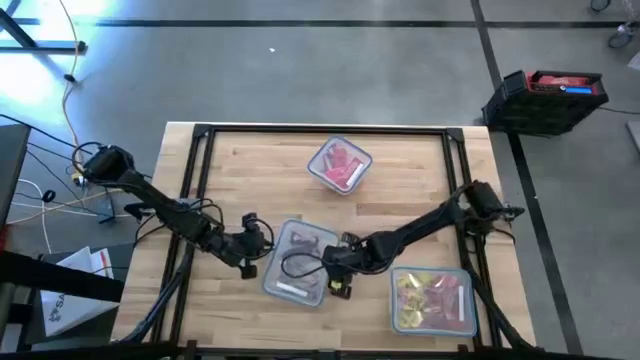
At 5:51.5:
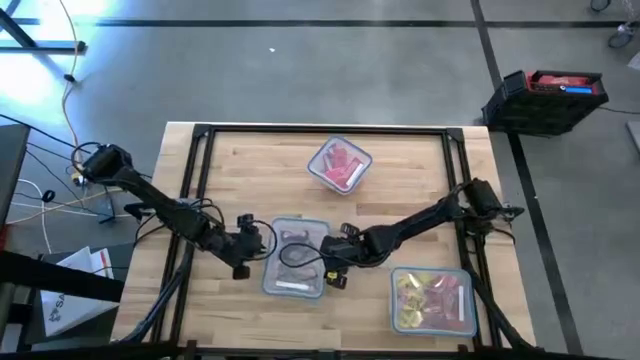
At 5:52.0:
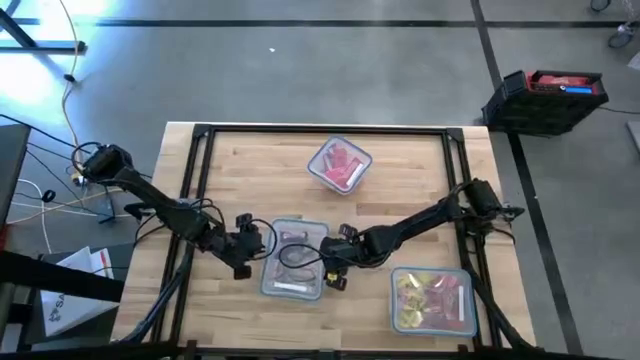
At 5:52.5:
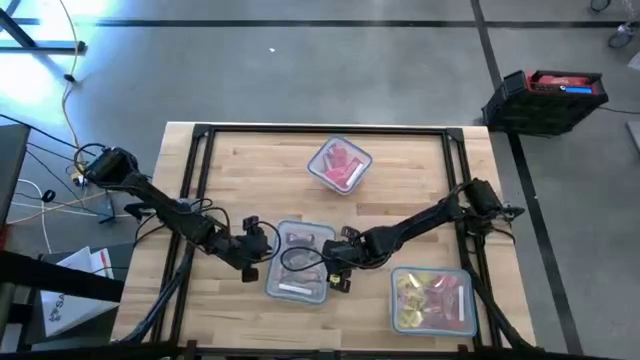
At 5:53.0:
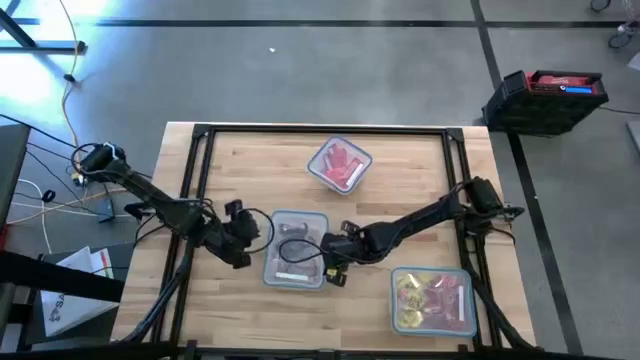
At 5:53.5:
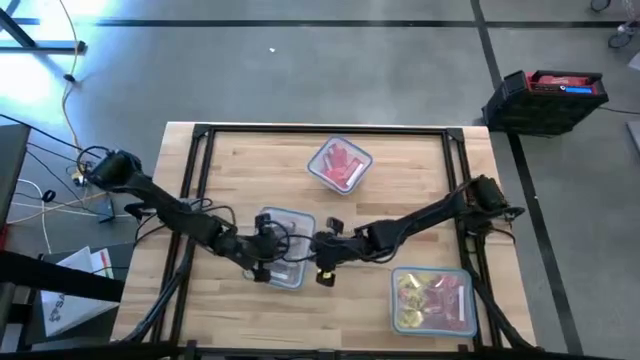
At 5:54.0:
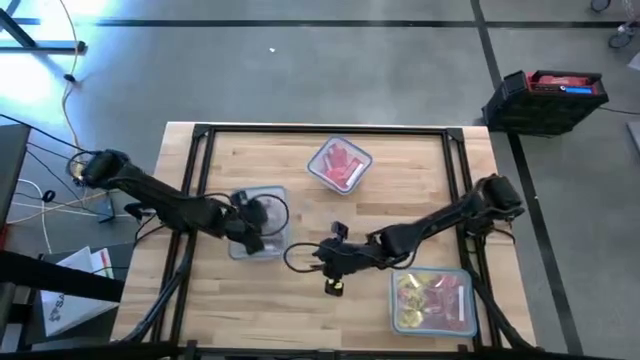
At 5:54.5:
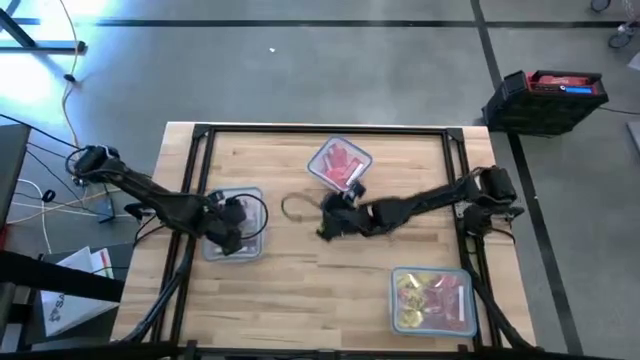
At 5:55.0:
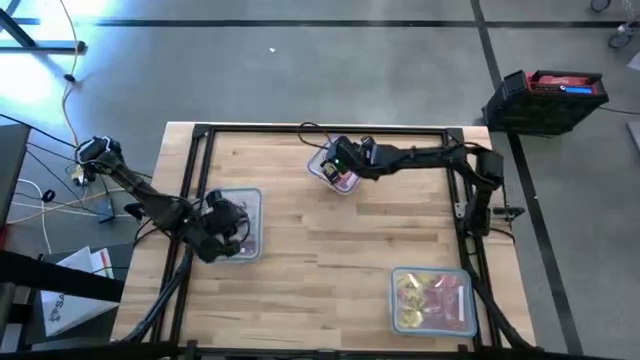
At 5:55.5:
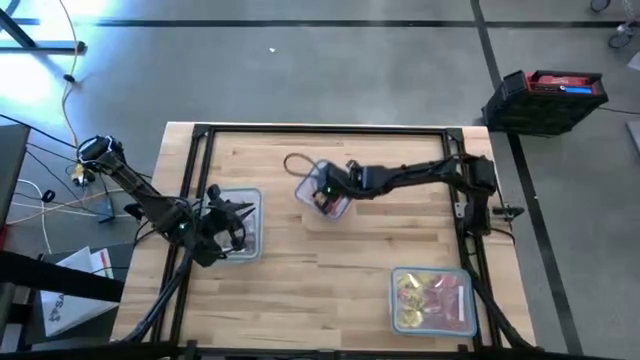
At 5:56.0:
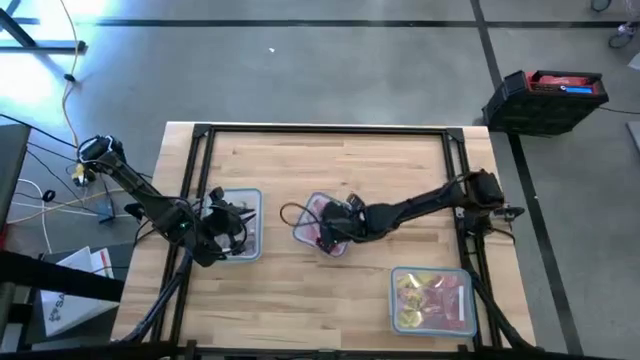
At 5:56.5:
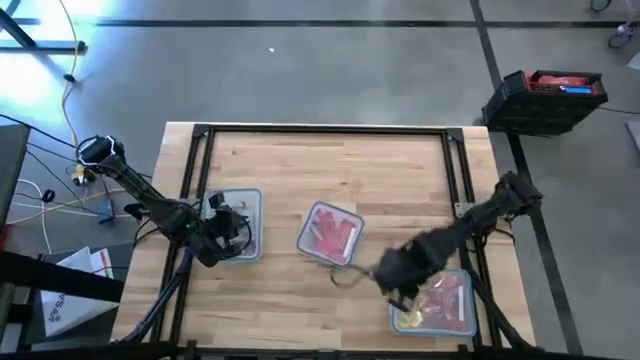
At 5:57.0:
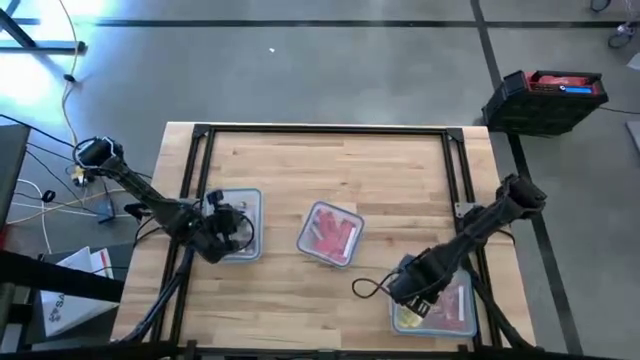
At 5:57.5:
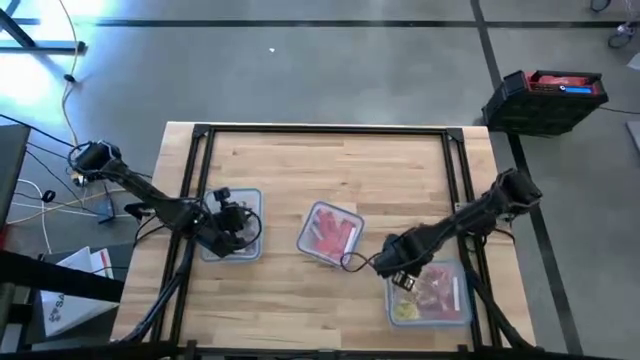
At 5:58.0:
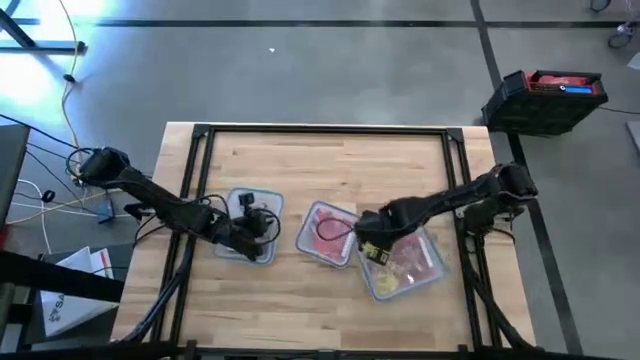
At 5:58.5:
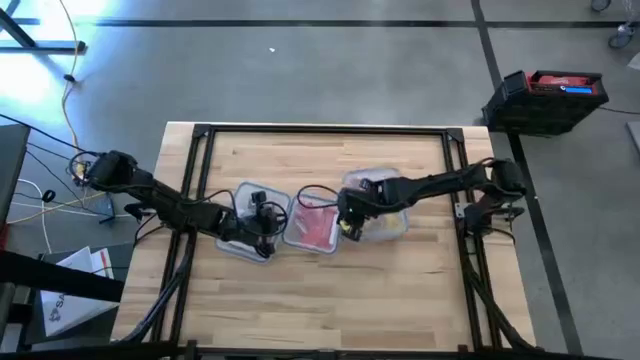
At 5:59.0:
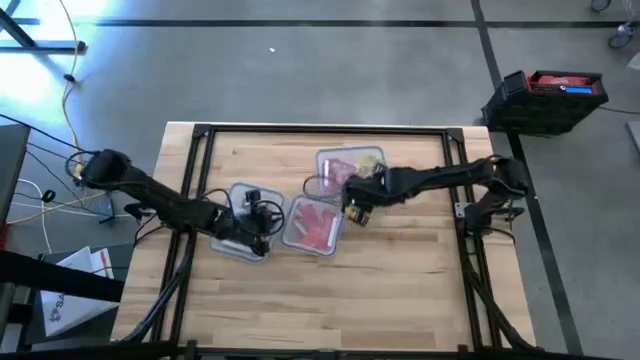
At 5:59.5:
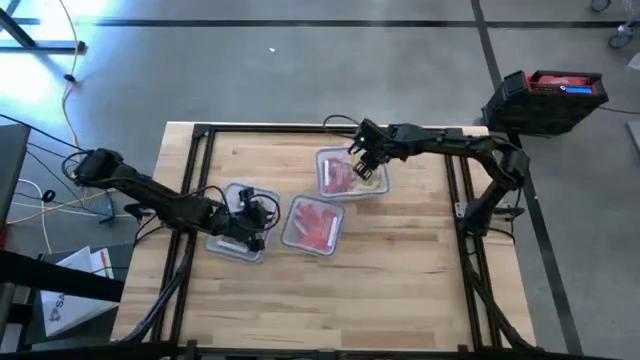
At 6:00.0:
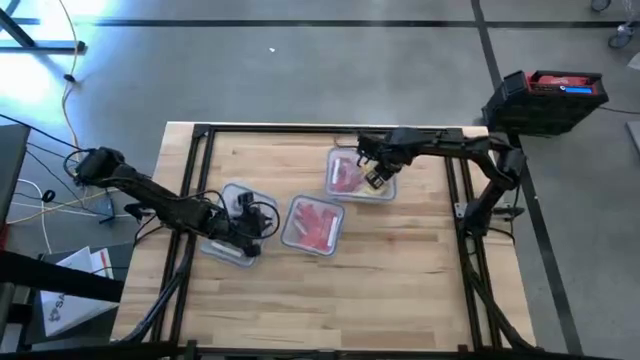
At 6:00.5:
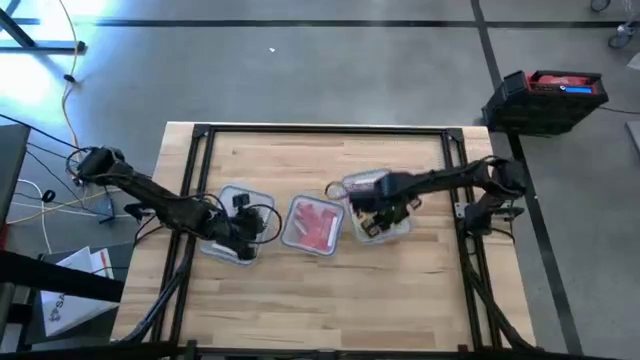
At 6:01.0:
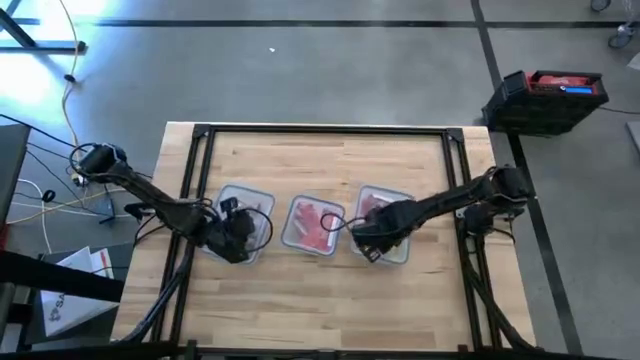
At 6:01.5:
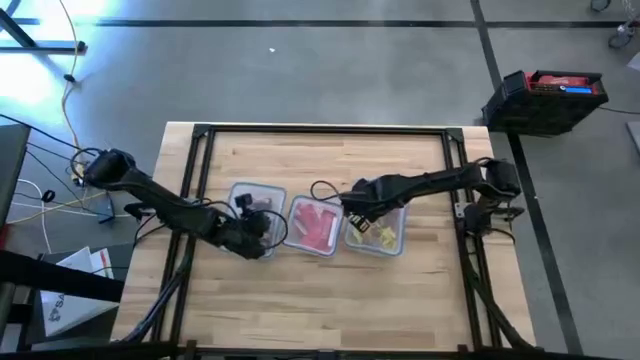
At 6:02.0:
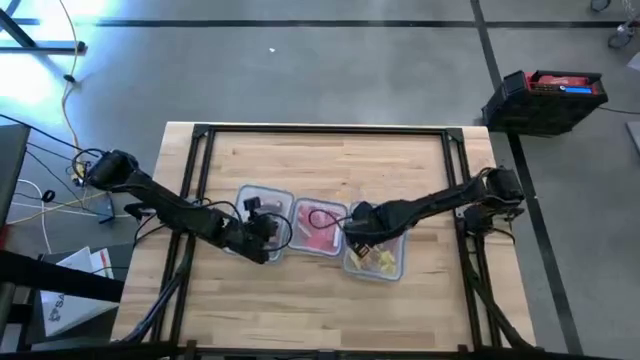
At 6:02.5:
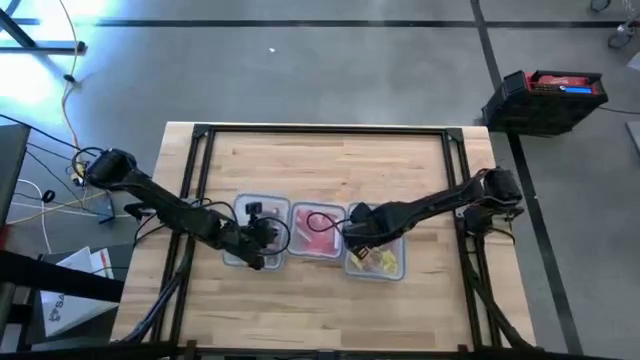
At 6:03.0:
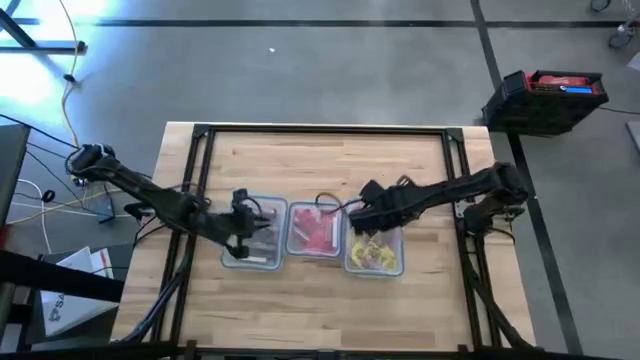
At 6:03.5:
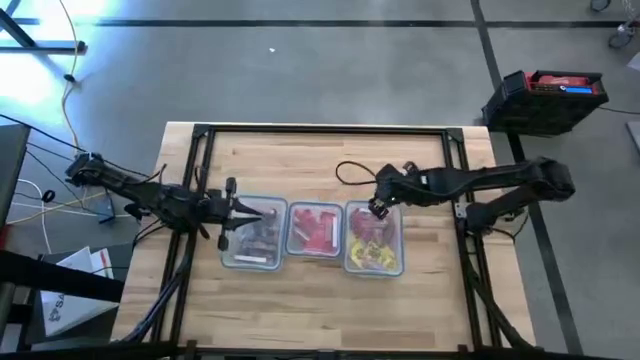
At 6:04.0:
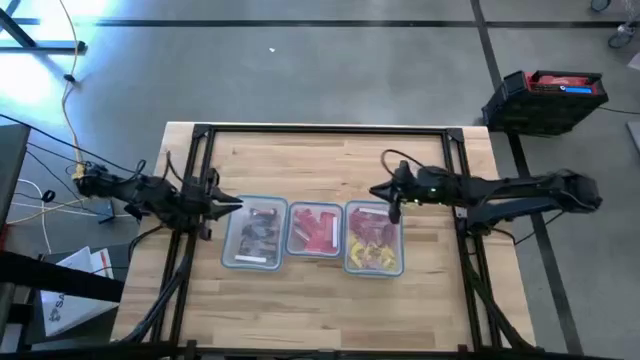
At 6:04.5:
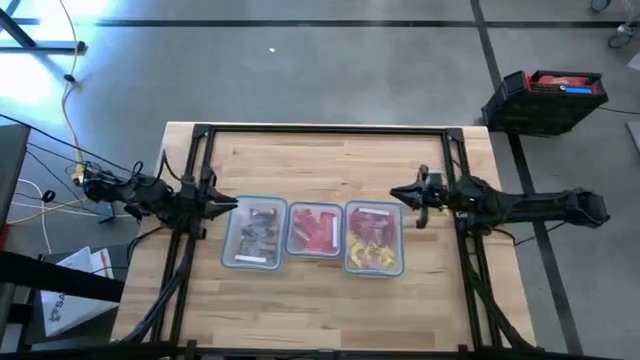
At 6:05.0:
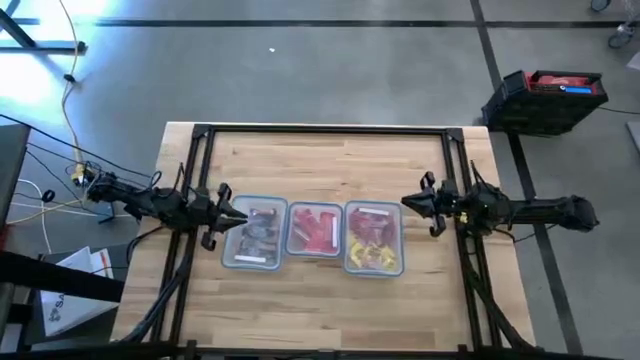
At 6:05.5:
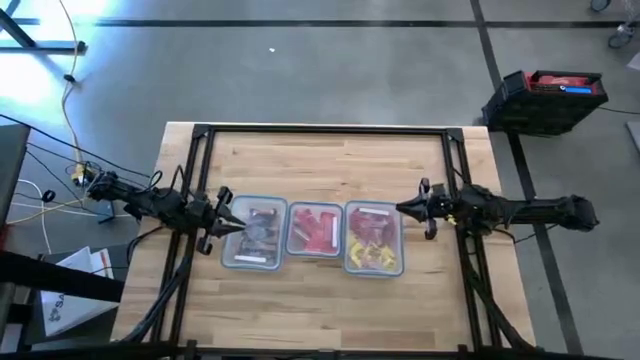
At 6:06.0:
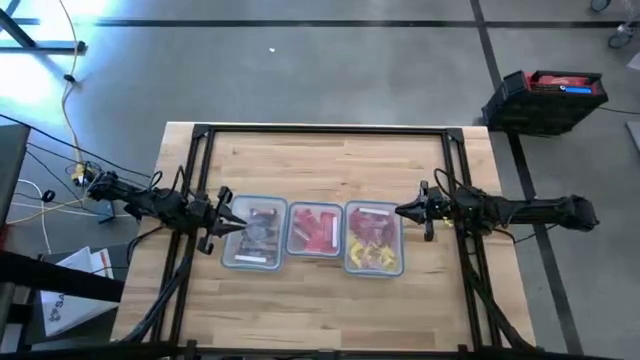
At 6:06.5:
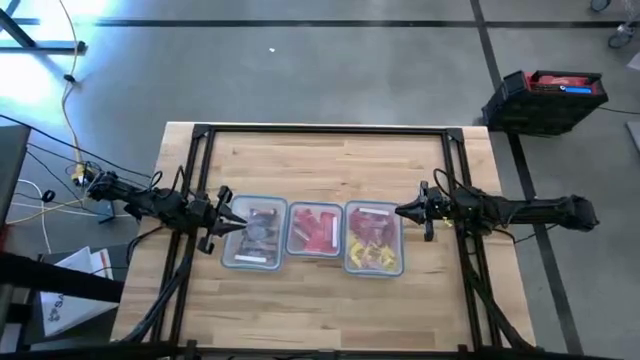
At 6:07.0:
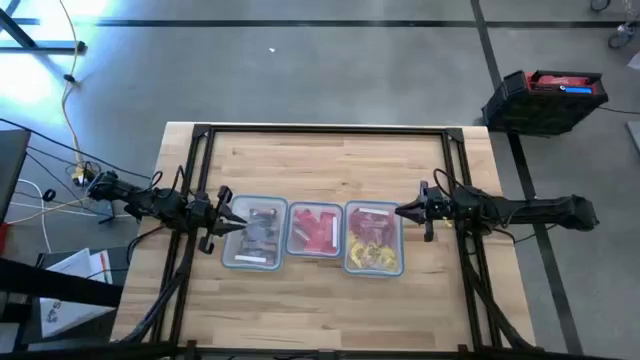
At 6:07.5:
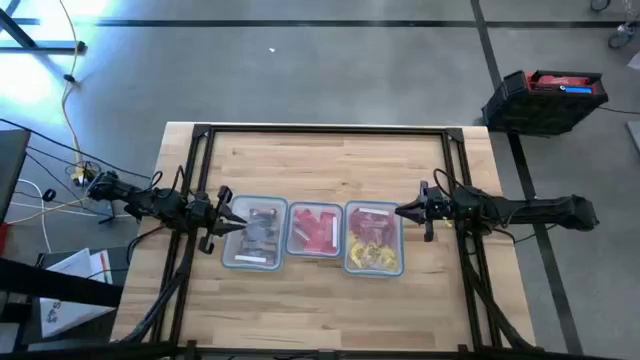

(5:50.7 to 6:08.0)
Task: Sort candy
Return to Home Position

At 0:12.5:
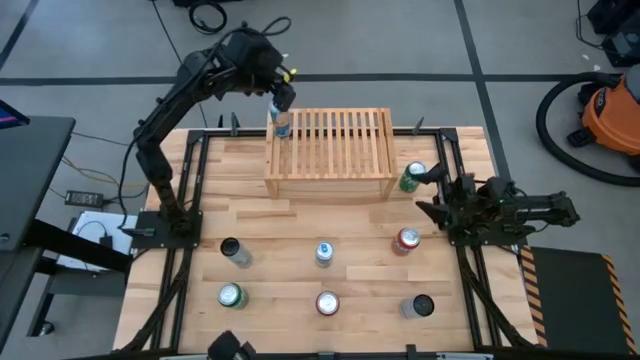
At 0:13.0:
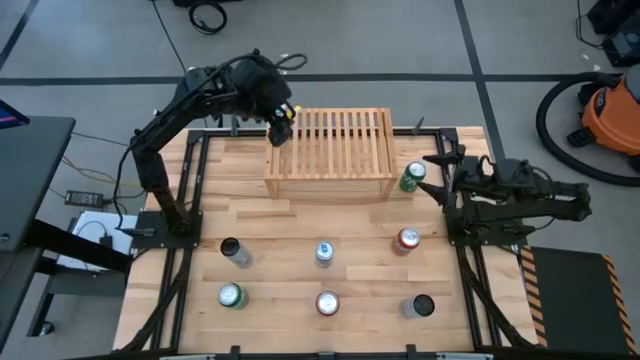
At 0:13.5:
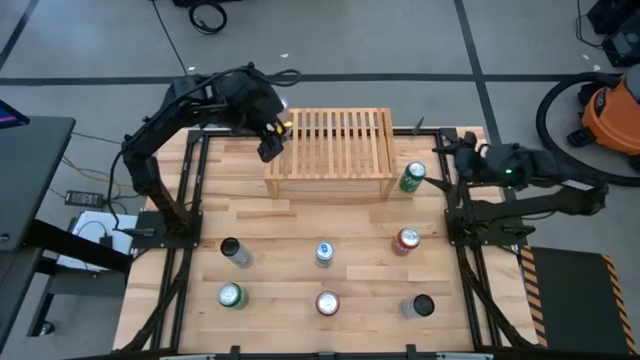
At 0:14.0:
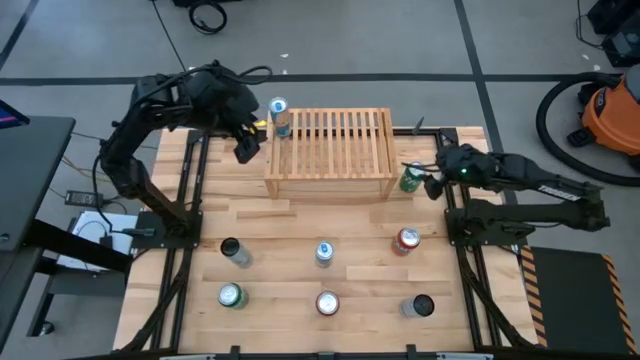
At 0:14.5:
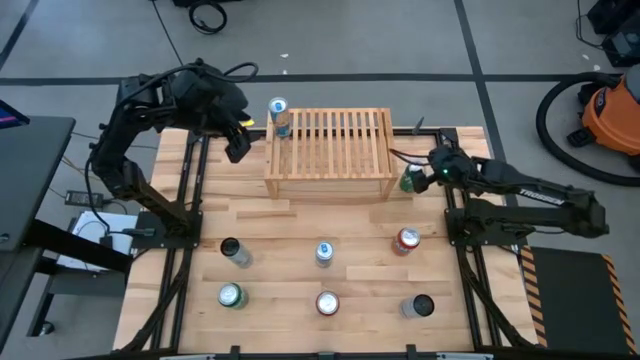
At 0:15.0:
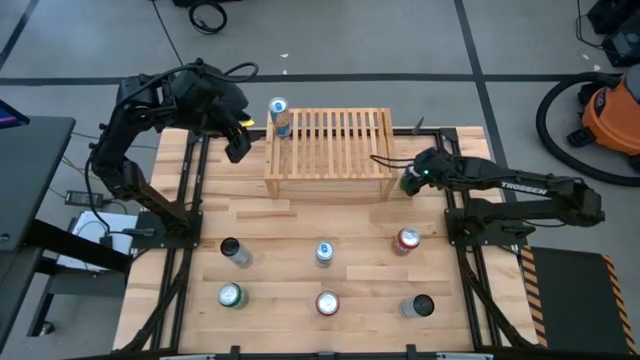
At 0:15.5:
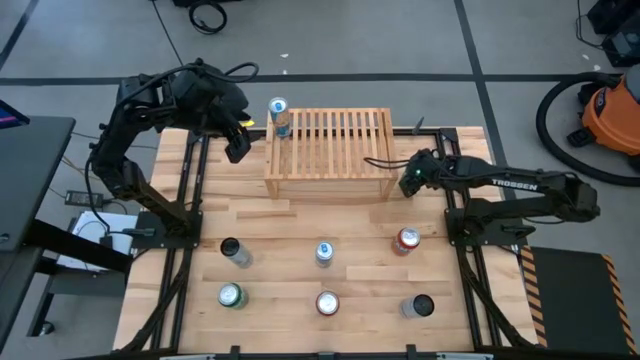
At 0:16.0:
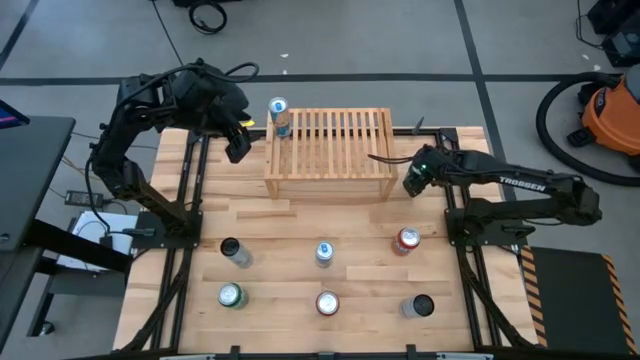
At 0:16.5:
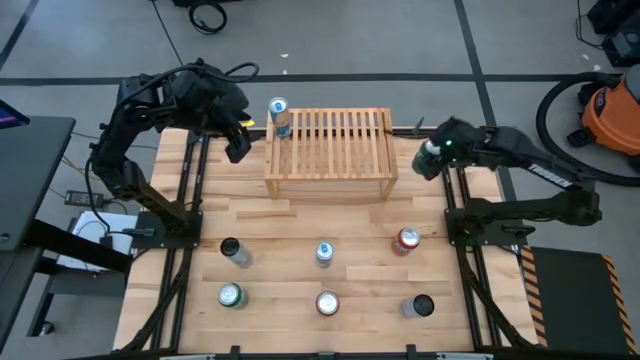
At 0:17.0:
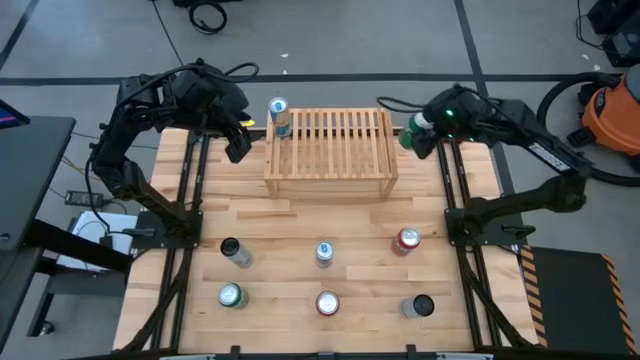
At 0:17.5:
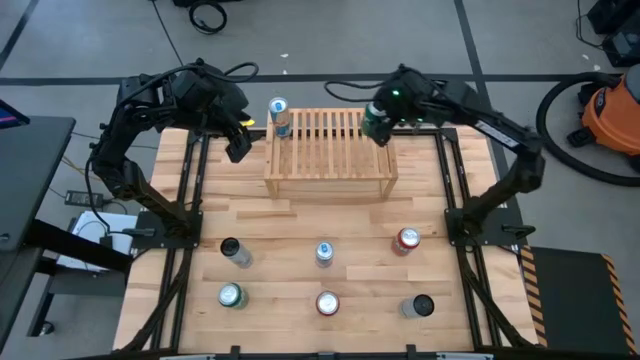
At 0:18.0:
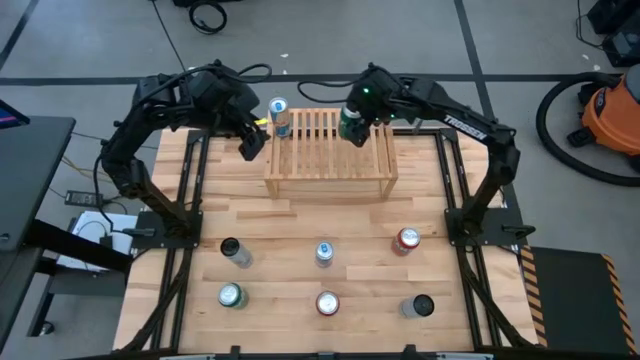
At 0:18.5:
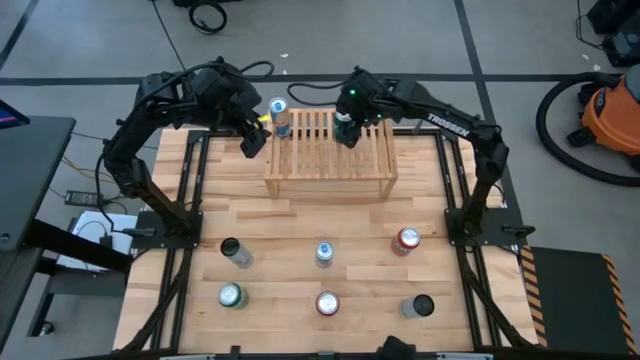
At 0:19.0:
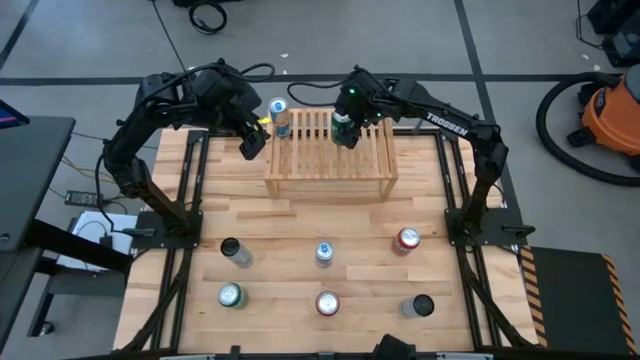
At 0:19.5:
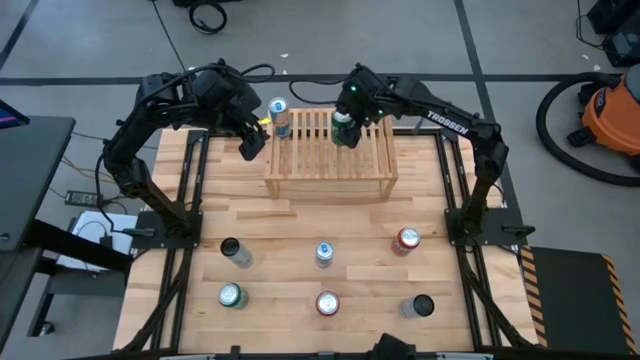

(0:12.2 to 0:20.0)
Task: Place canned beverage on shelf
Put the top green soda can on the shelf
